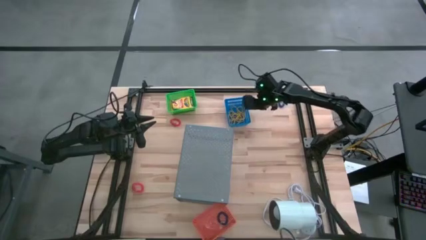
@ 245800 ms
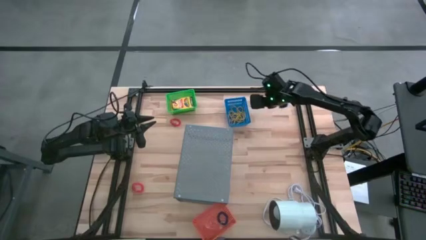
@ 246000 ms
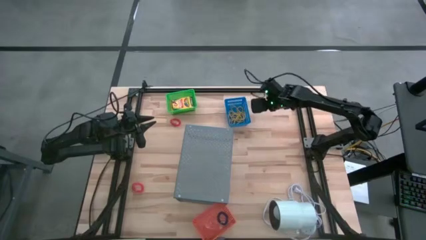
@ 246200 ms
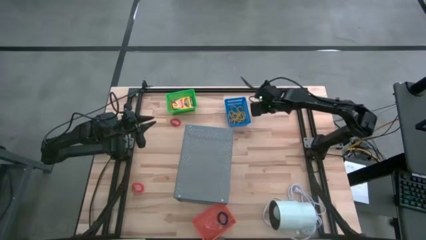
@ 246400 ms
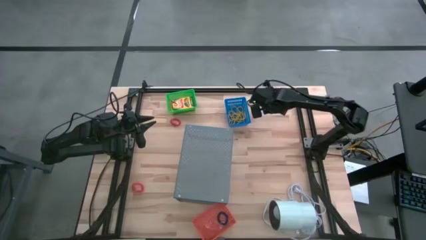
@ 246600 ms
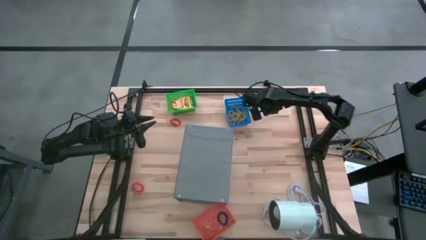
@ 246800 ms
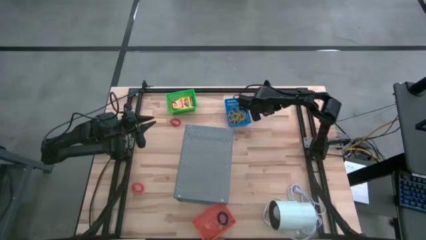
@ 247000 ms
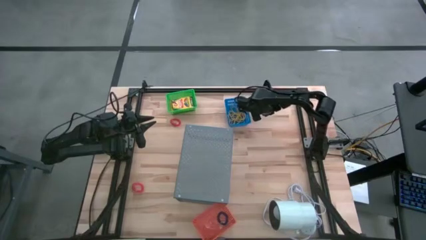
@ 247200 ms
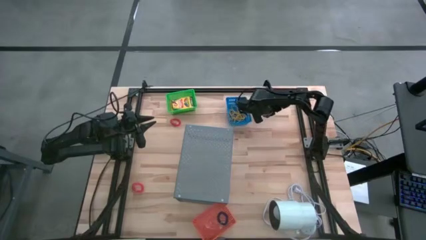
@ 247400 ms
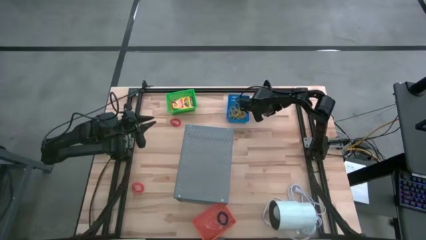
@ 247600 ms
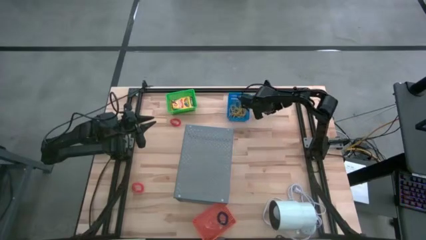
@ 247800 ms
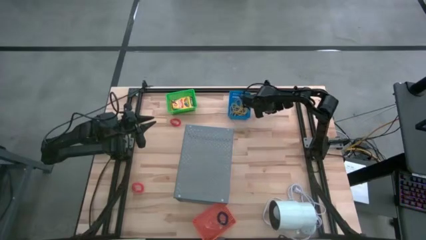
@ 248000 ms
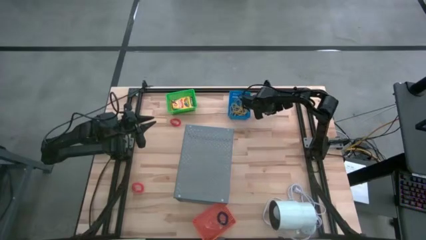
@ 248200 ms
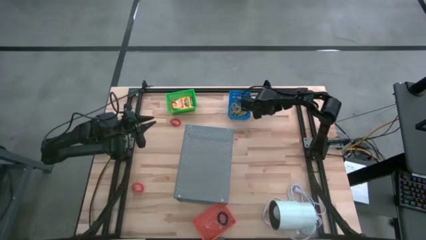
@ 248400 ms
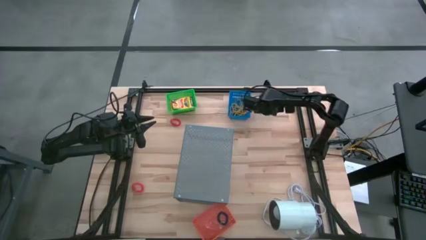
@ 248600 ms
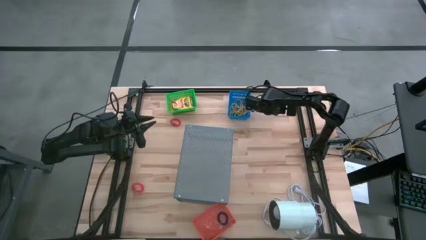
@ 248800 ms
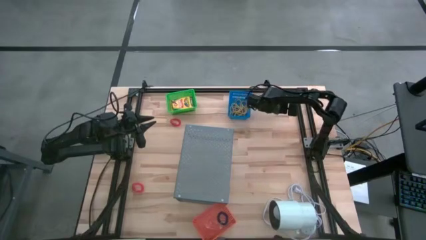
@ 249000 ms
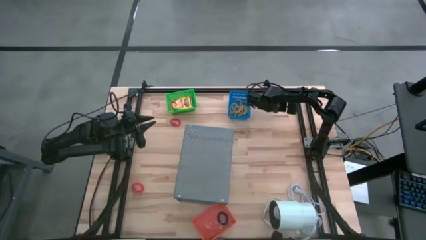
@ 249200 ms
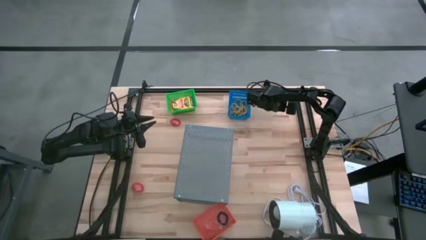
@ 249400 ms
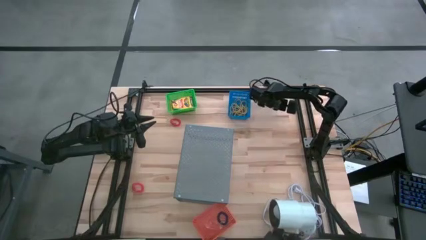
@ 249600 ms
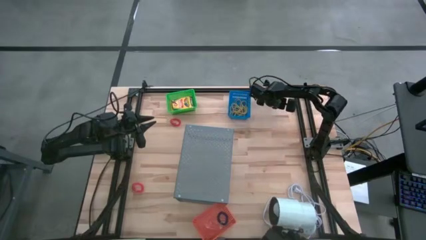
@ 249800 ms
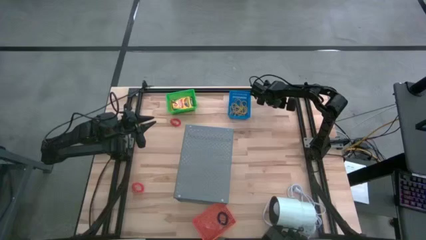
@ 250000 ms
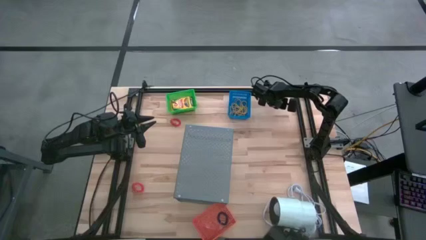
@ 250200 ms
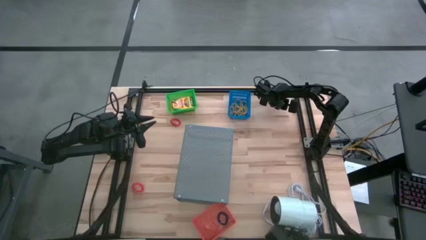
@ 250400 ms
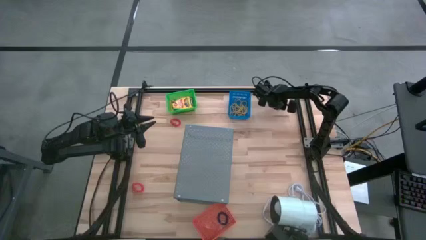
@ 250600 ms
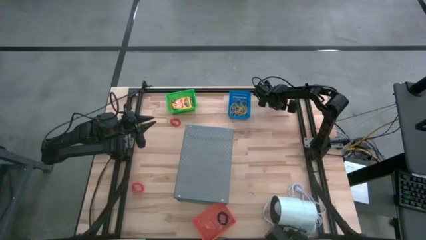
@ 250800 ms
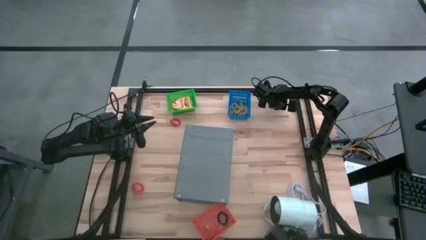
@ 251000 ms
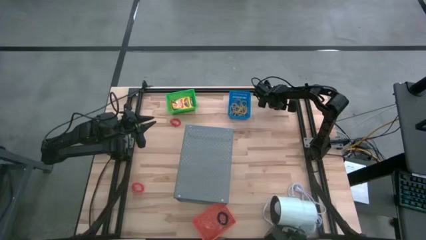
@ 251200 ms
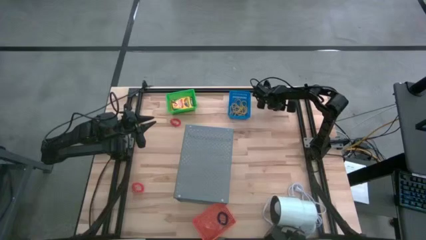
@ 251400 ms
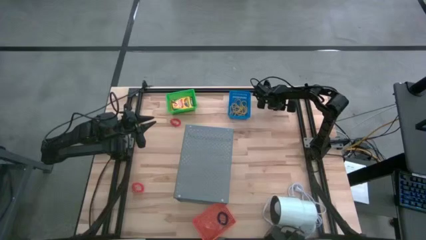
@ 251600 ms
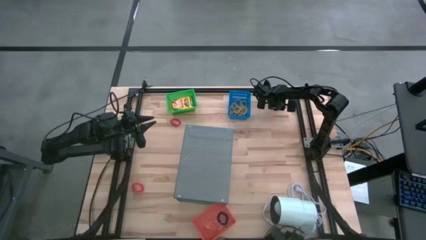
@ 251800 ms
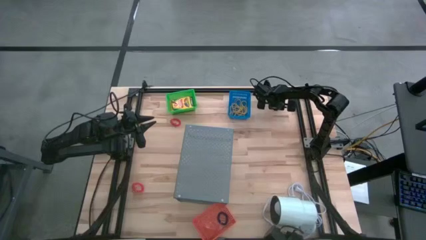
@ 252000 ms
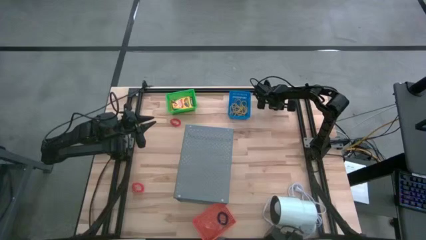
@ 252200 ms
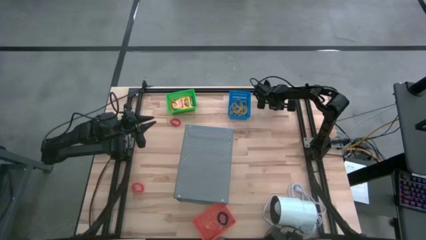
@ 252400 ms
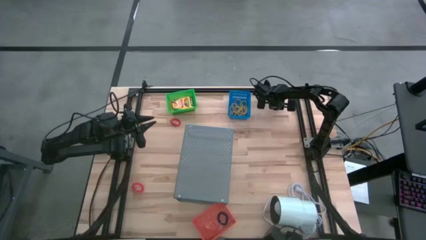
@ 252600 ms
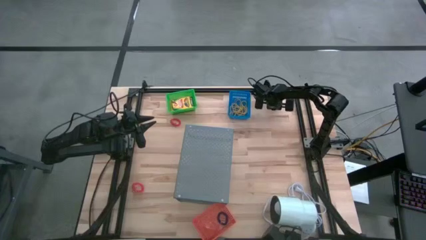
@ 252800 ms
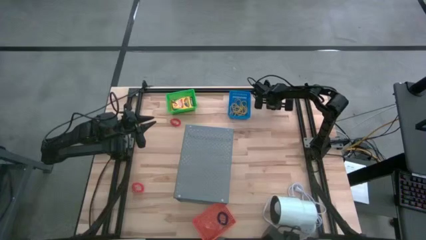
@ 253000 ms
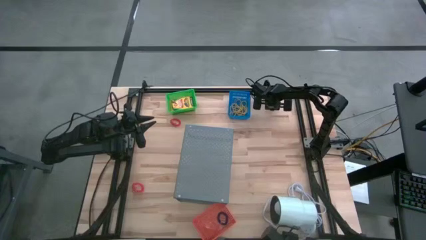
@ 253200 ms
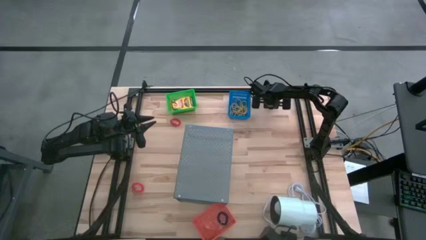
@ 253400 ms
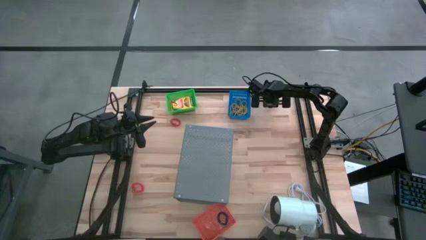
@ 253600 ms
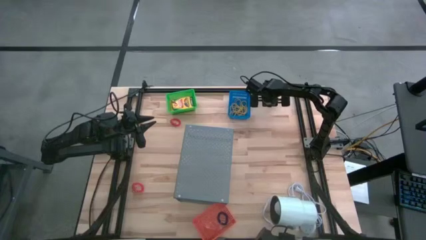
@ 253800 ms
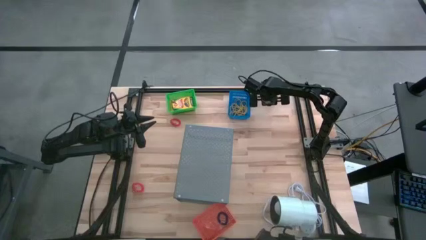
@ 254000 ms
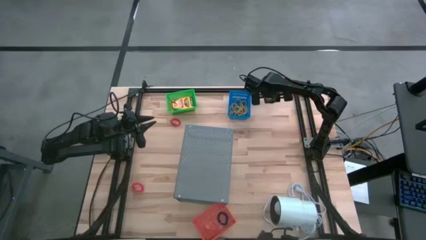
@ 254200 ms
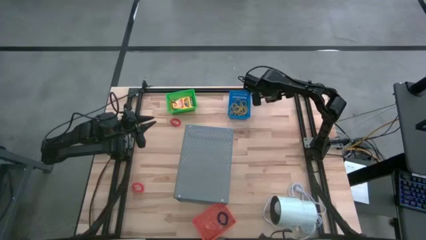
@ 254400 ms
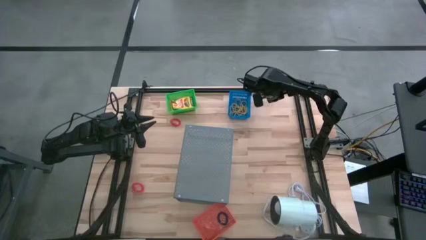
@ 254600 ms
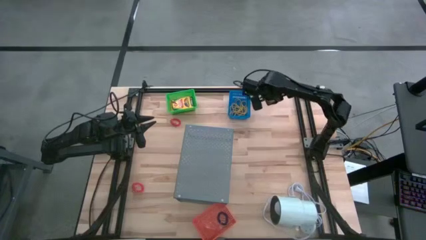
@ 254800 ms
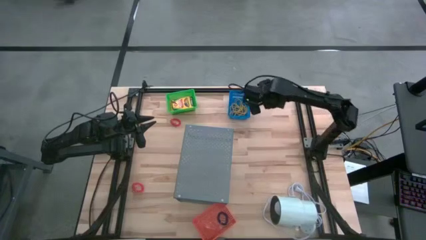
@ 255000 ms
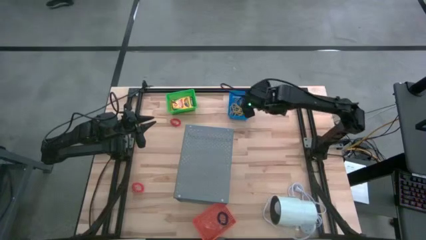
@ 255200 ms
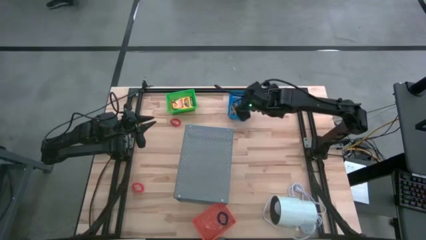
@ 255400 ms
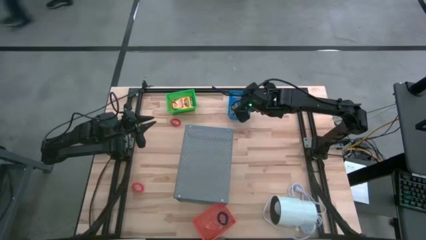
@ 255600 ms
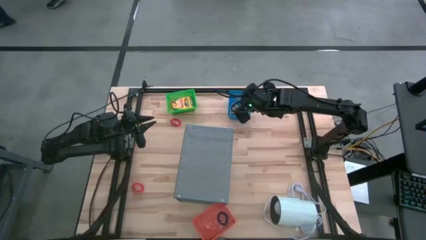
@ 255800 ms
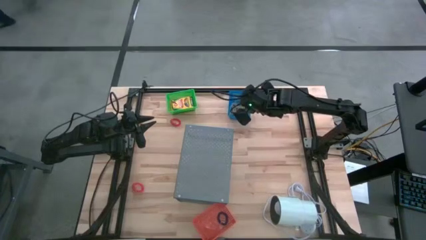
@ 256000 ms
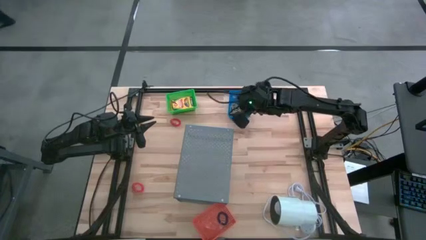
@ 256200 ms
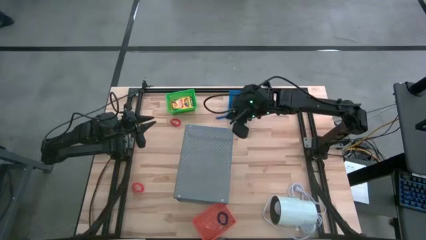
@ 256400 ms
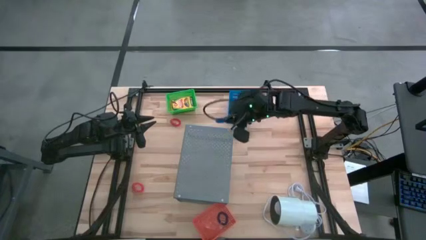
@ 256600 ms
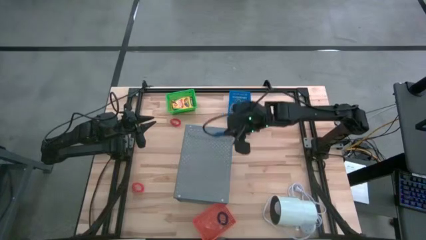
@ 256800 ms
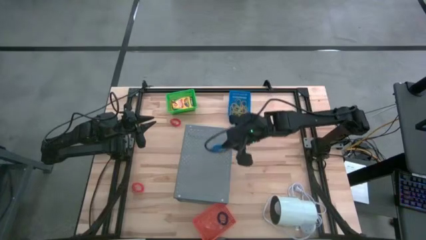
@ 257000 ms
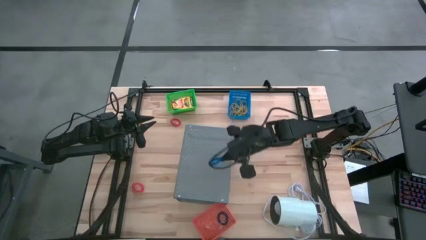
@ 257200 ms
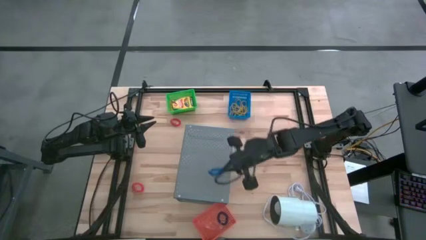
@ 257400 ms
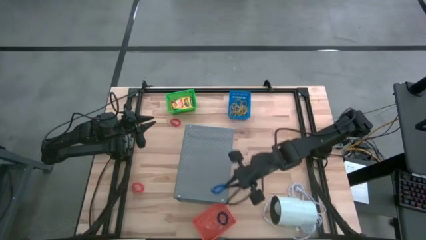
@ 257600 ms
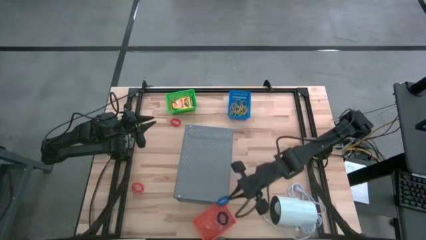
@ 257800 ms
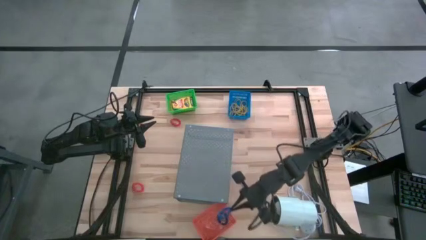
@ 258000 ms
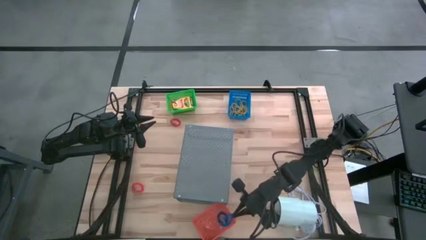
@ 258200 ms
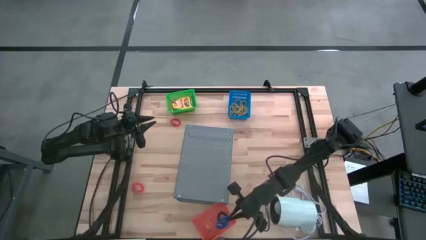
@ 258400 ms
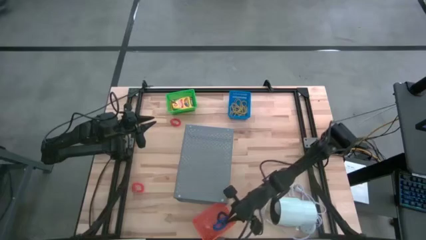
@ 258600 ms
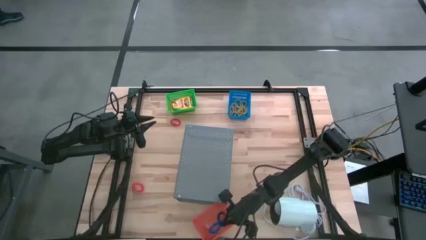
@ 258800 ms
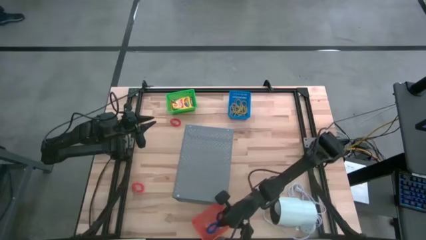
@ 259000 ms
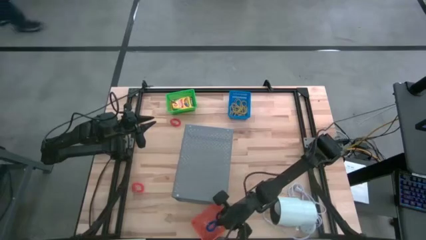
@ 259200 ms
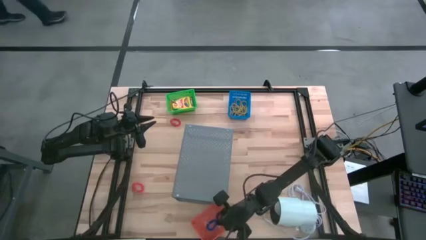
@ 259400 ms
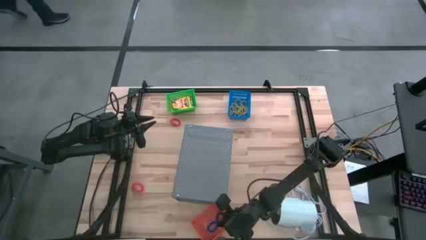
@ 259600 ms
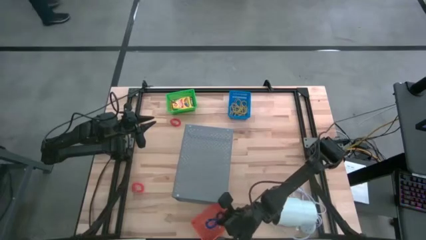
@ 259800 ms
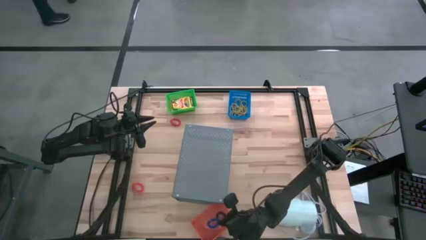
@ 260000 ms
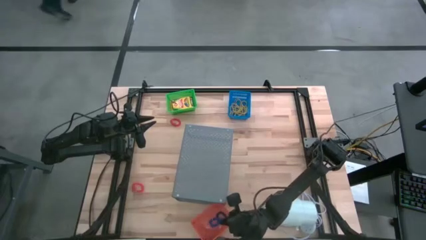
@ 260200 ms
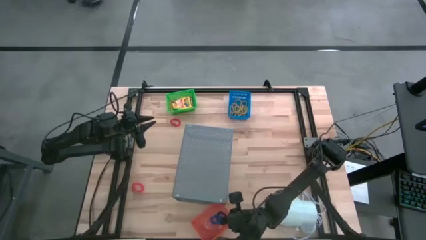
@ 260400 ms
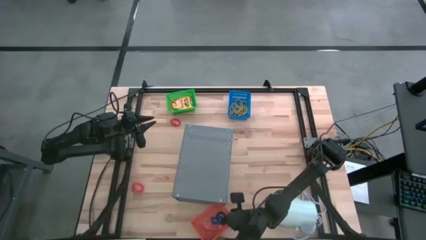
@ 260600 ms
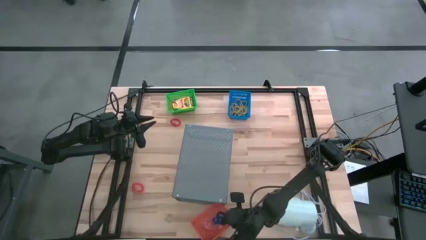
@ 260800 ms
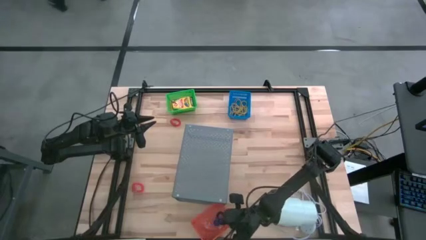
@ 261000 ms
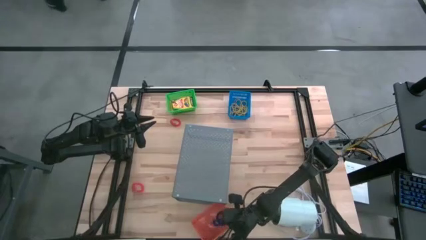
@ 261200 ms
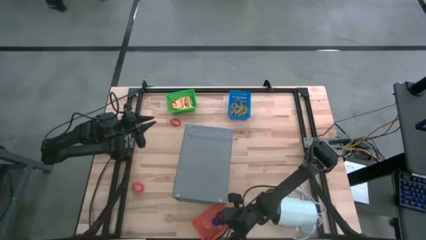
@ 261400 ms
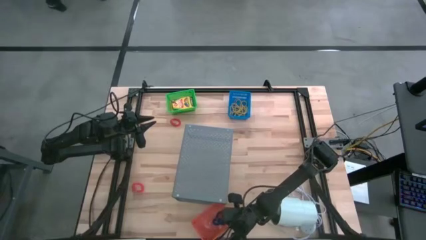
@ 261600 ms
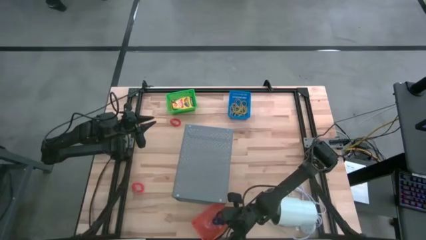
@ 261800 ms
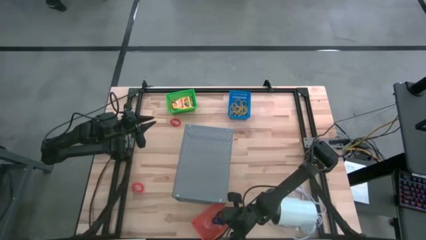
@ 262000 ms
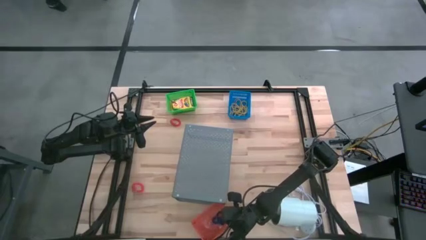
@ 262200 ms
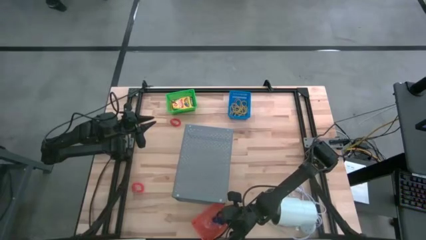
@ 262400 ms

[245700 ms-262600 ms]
Task: Pick & Place Office Desk Supplies
Put the blue spring keychain into the orange basket
